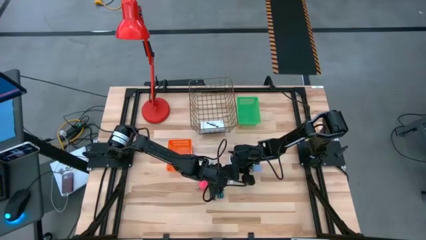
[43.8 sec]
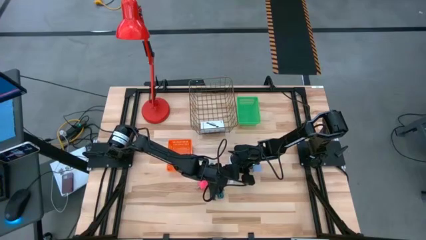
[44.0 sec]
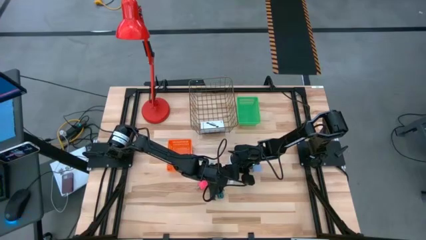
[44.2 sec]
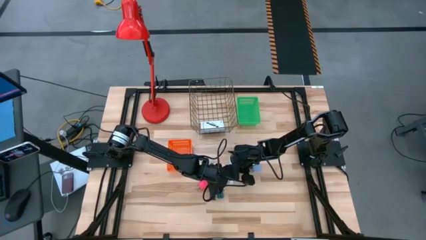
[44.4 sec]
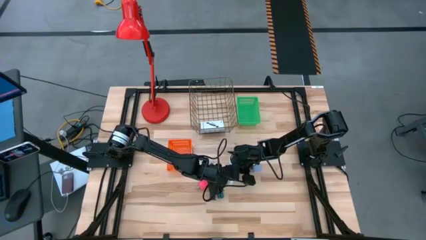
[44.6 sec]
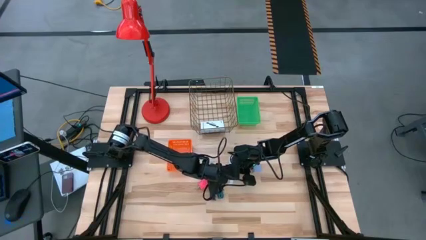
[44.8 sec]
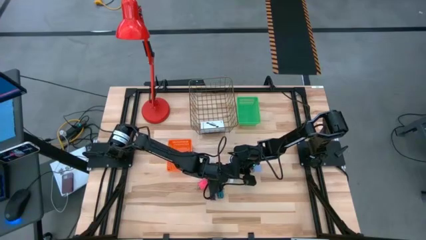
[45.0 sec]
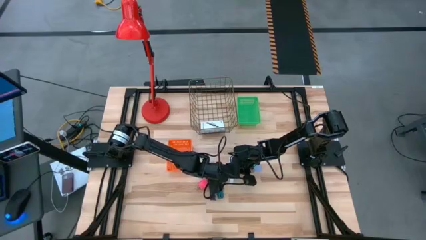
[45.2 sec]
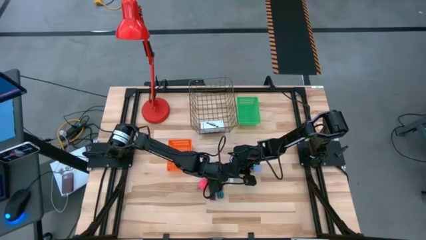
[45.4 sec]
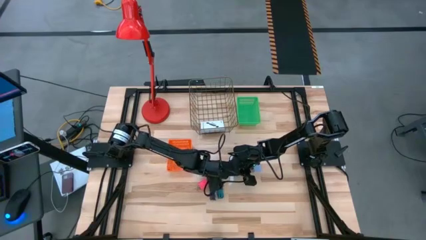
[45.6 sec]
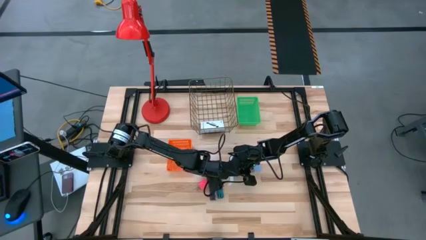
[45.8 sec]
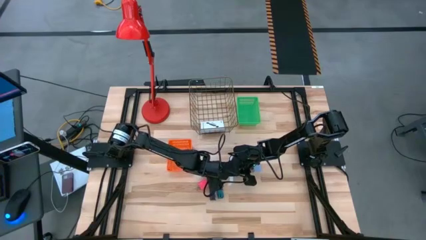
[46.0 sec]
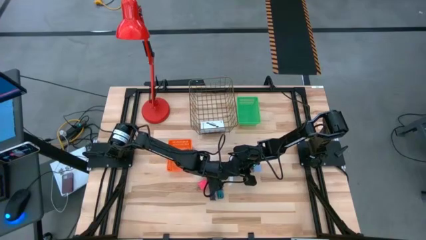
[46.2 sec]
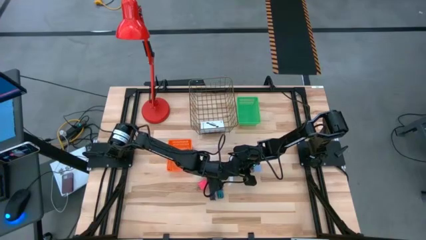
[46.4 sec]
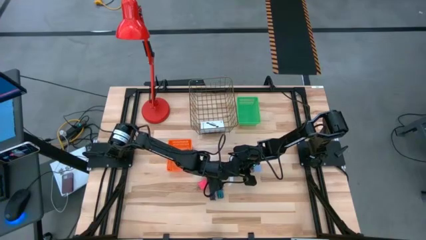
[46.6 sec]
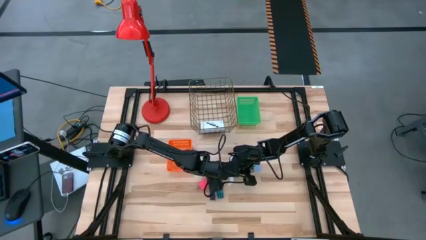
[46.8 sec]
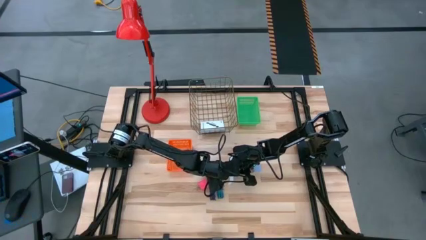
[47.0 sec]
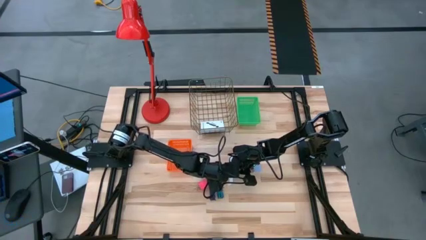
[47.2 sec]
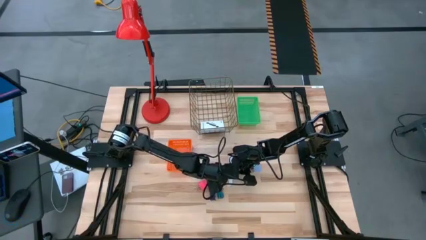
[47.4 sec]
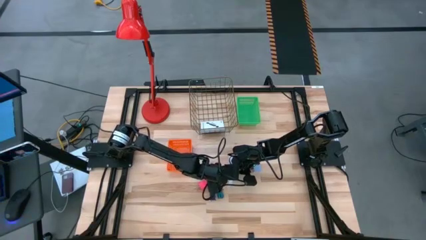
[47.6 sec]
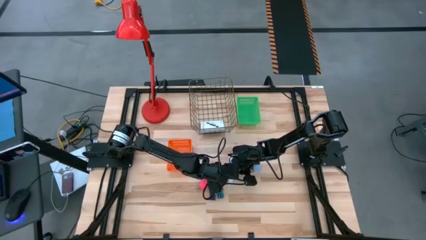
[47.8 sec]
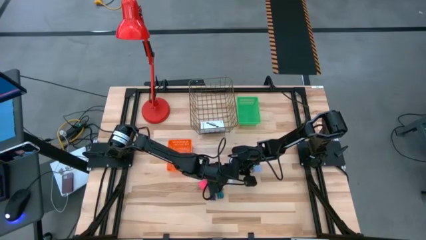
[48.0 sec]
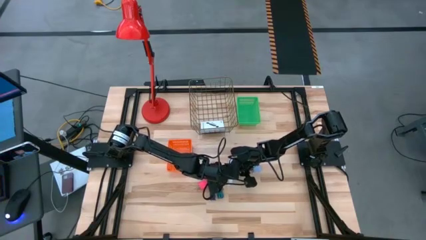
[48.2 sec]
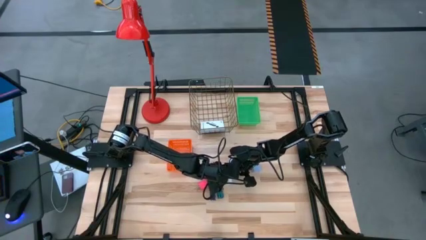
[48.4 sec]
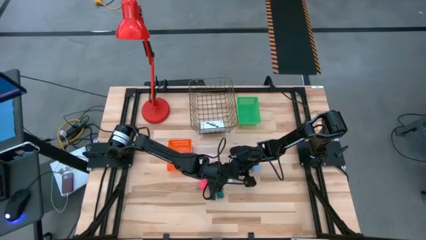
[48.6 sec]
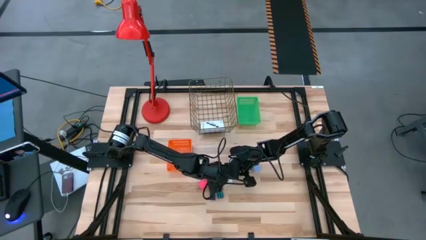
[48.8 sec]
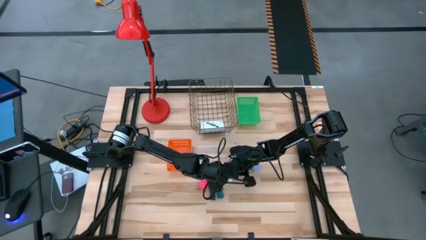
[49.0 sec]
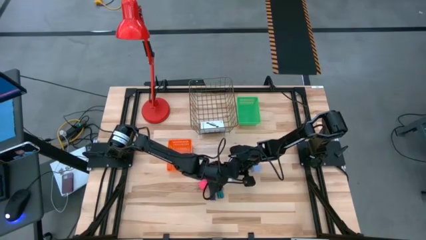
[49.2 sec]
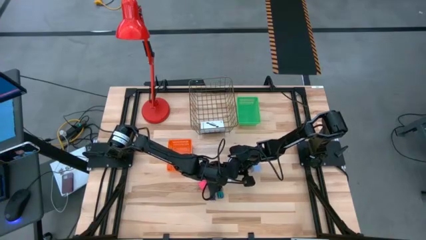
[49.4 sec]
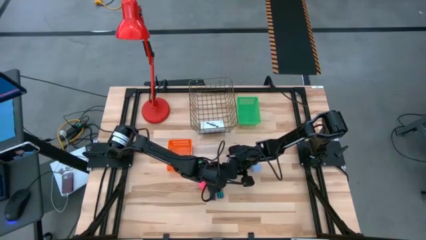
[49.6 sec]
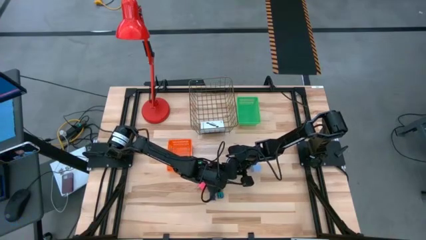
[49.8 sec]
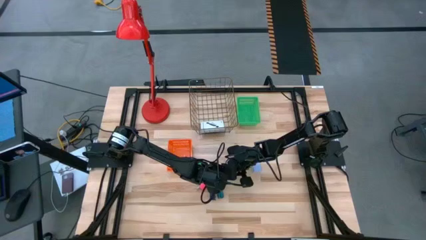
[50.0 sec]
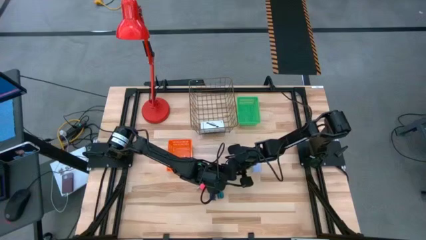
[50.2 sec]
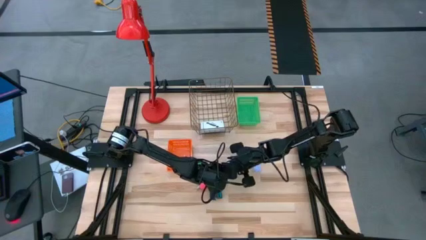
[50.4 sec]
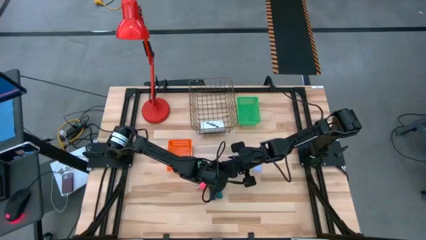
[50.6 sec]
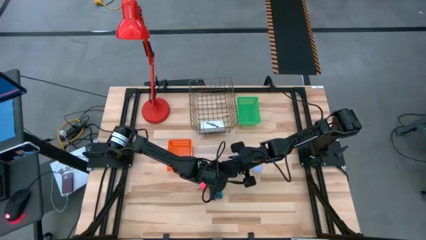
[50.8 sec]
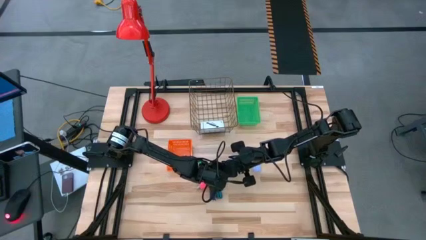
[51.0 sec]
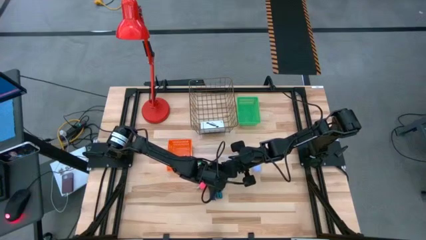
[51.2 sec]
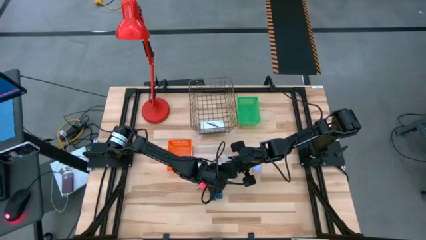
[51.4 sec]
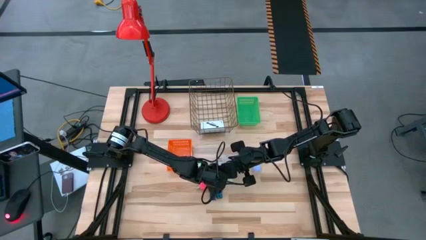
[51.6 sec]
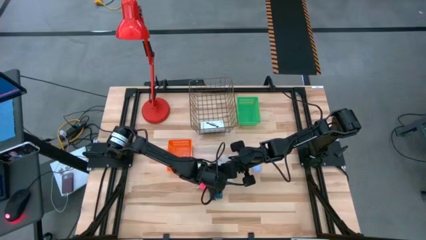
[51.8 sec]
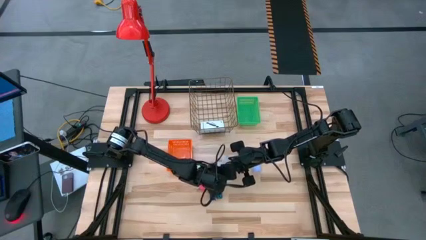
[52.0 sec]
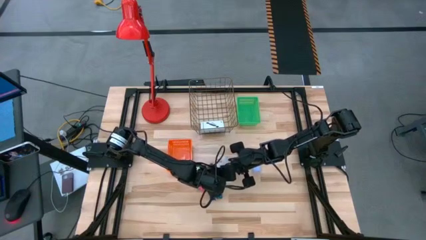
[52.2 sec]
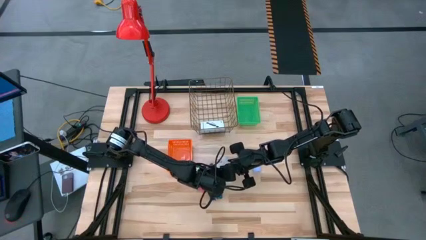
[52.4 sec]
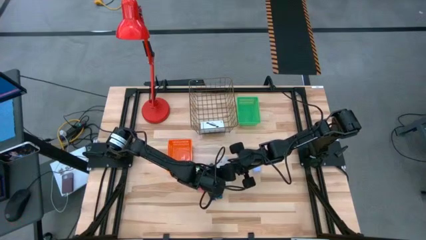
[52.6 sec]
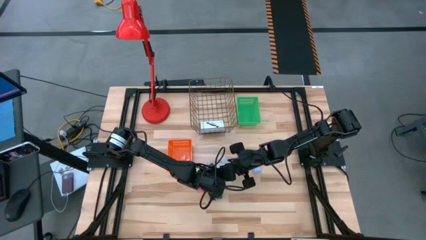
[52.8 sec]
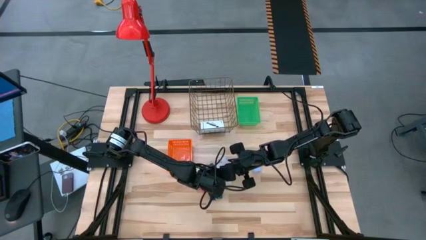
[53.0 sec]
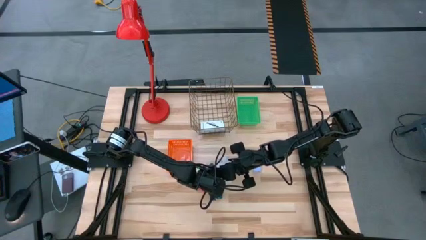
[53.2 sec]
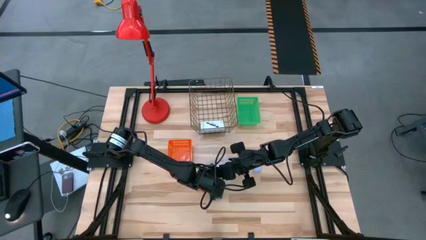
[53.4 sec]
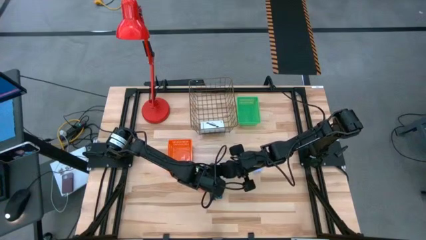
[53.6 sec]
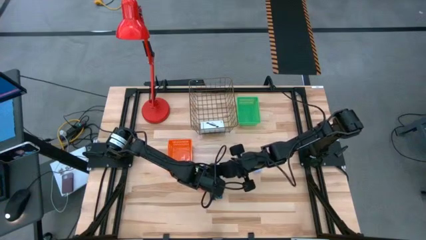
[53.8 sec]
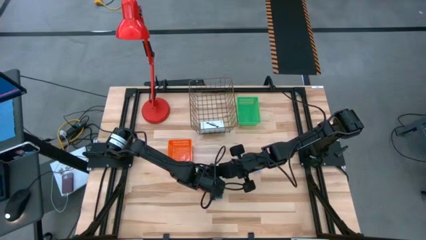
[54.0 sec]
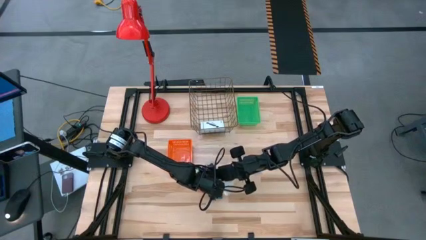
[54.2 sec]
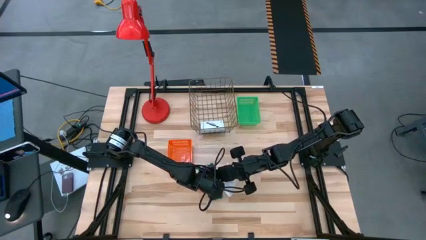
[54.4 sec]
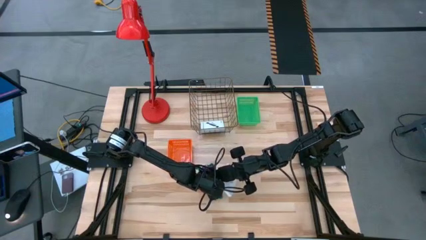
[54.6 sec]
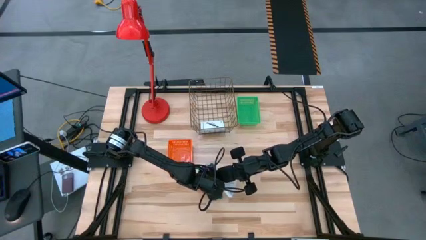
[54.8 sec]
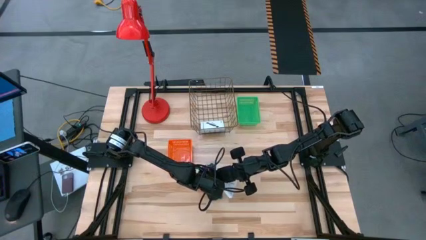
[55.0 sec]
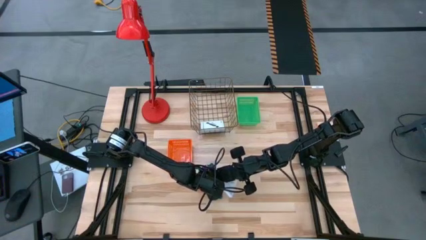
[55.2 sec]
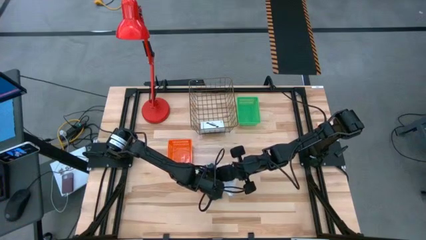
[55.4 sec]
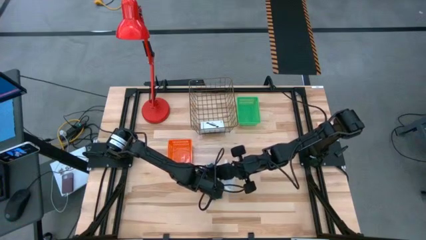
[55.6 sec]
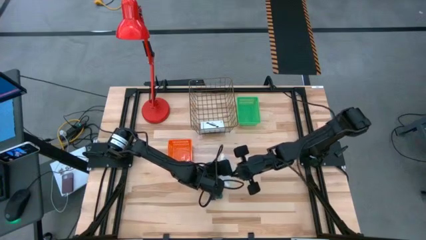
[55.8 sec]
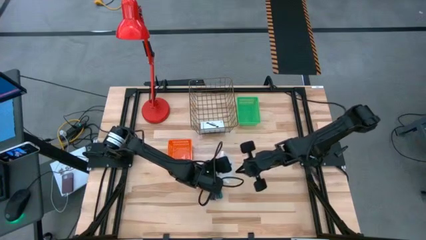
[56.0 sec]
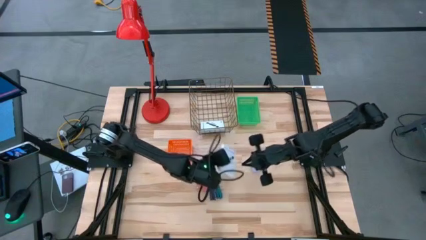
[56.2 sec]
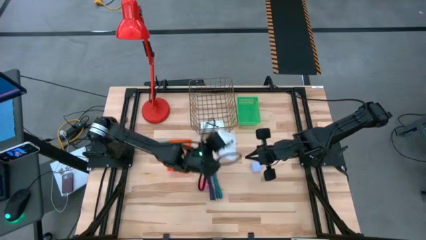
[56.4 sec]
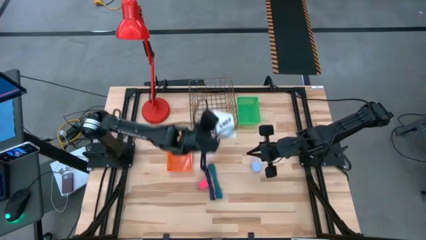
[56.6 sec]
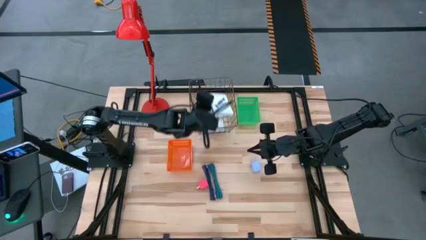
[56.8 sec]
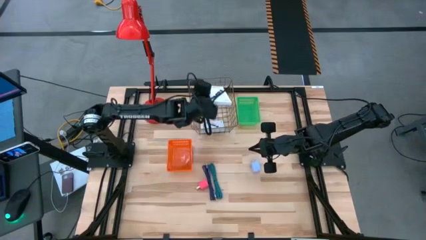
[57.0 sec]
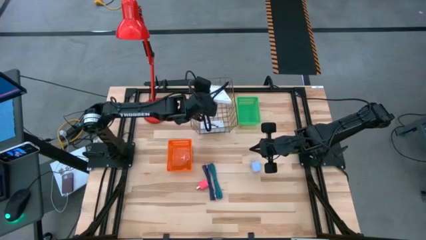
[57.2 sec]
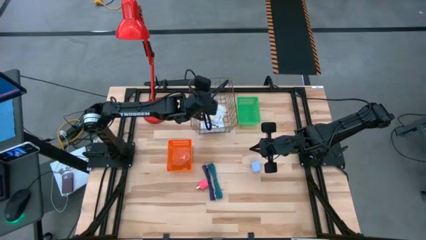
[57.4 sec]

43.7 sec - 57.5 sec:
Task: Pick and place items into bin
Put the card reader box into the wire basket
